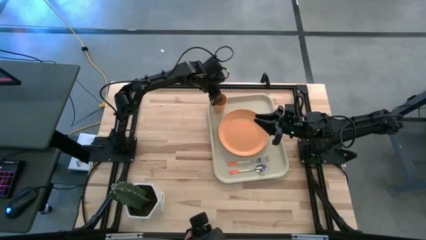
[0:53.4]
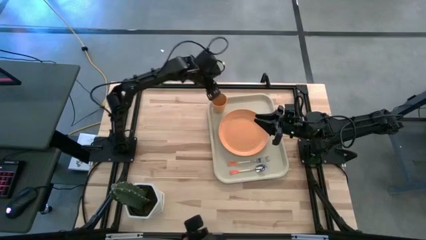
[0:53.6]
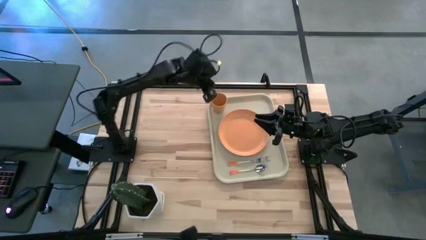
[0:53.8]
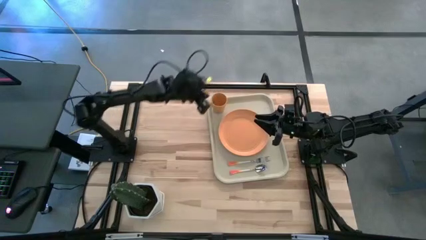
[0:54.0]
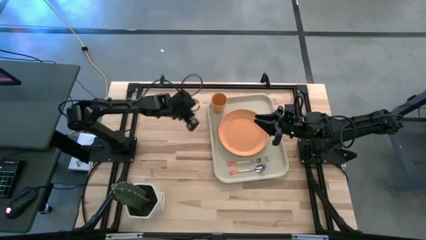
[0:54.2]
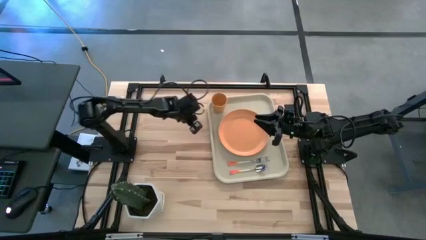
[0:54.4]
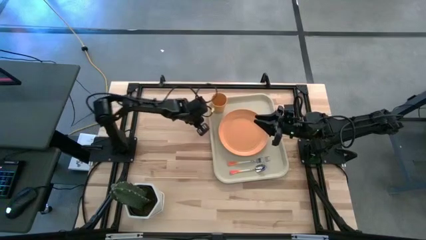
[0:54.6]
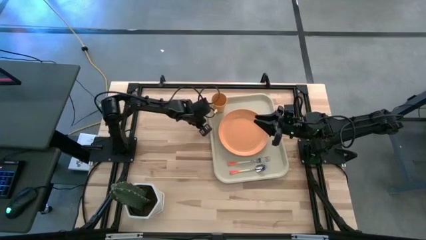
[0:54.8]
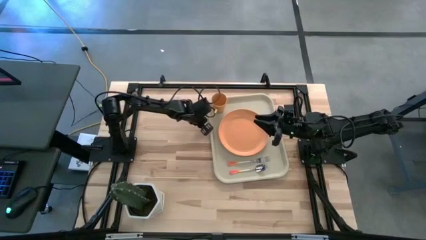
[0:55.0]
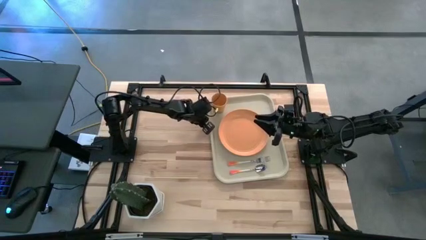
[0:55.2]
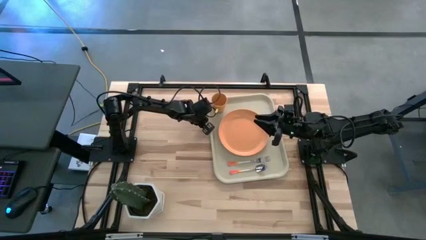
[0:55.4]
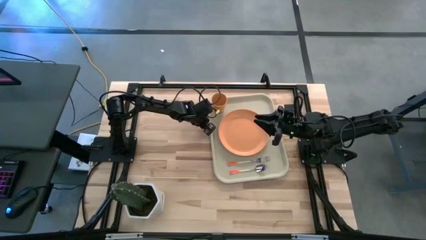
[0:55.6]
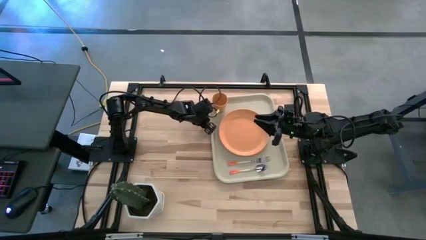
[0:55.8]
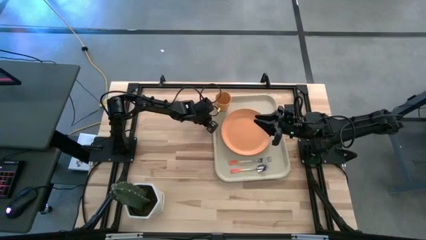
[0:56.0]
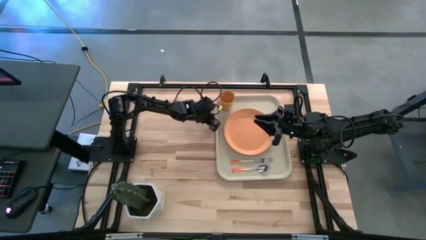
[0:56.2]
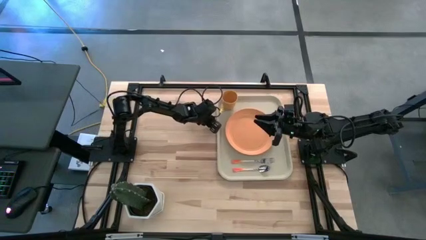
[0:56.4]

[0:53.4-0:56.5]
Task: Pick and place plate/cup/fork/spoon on tray
Adjust the beige serving tray

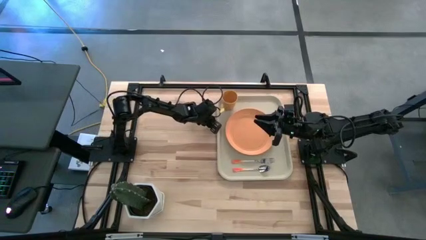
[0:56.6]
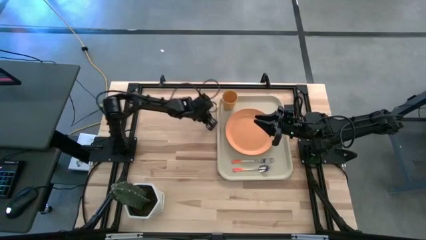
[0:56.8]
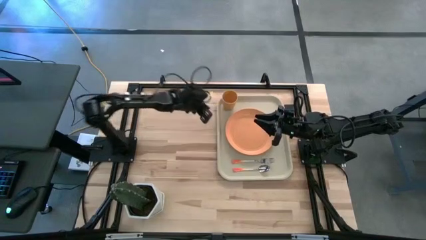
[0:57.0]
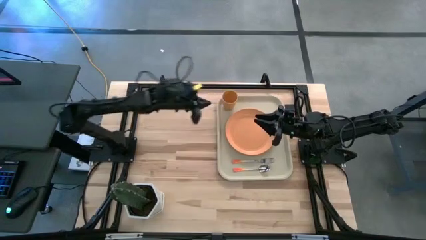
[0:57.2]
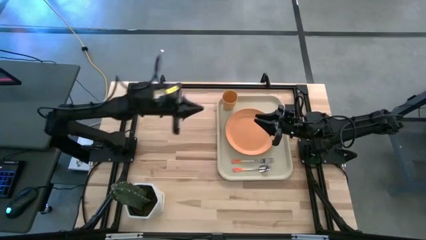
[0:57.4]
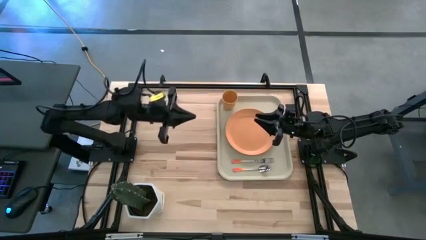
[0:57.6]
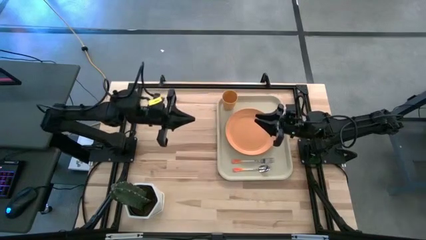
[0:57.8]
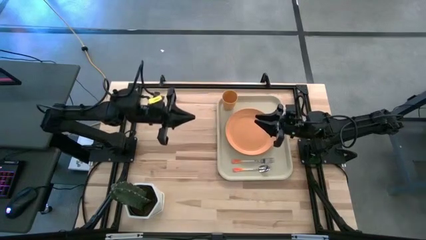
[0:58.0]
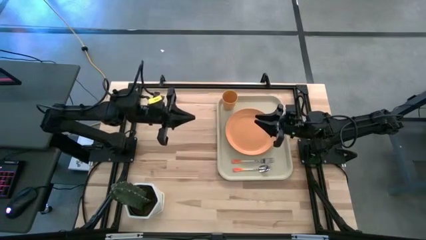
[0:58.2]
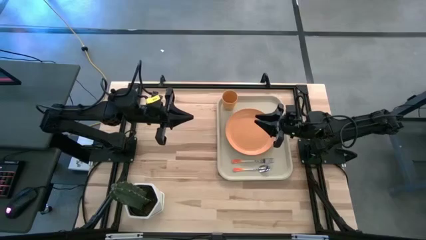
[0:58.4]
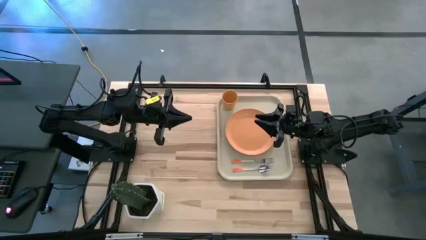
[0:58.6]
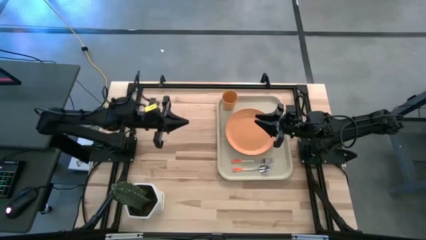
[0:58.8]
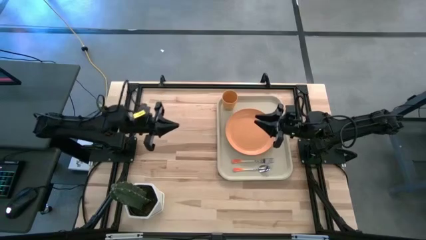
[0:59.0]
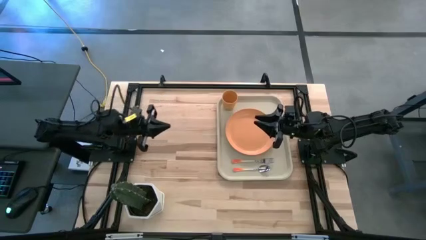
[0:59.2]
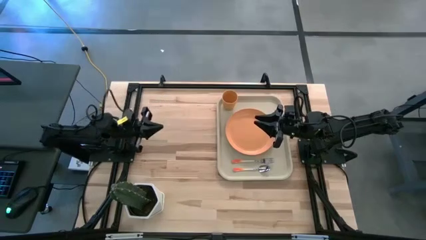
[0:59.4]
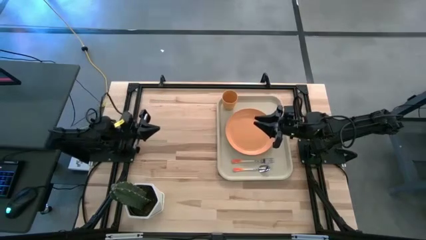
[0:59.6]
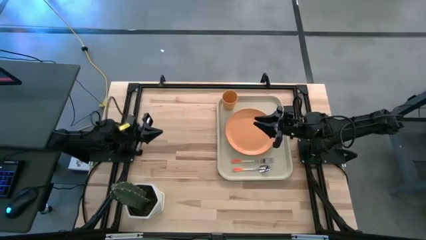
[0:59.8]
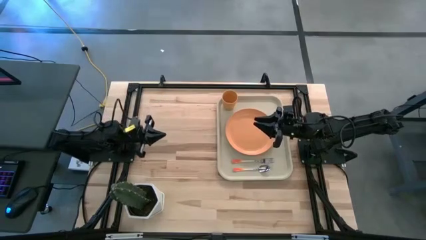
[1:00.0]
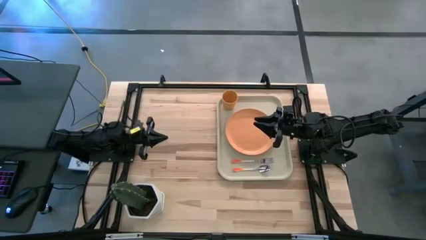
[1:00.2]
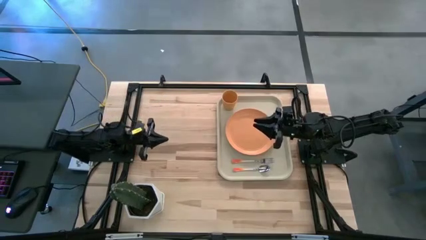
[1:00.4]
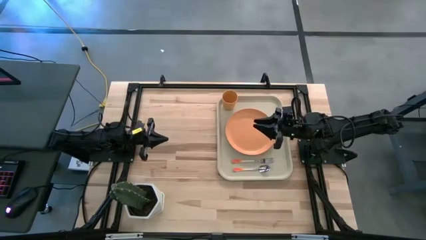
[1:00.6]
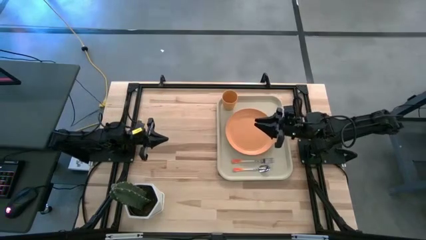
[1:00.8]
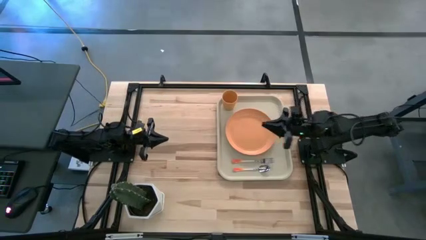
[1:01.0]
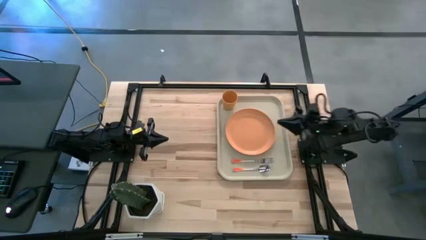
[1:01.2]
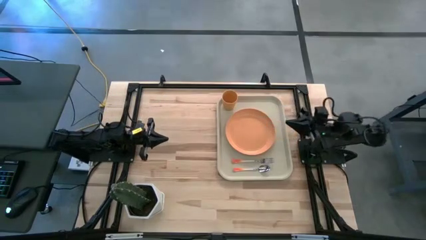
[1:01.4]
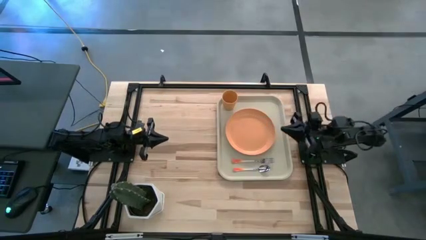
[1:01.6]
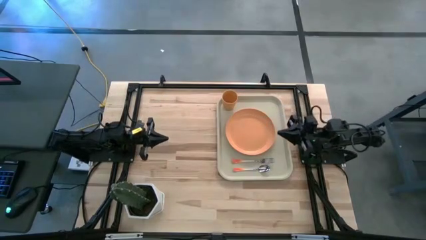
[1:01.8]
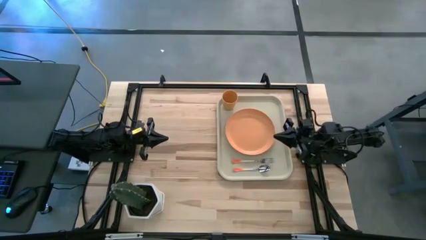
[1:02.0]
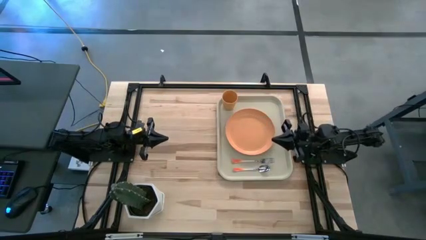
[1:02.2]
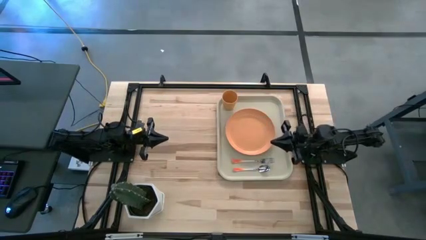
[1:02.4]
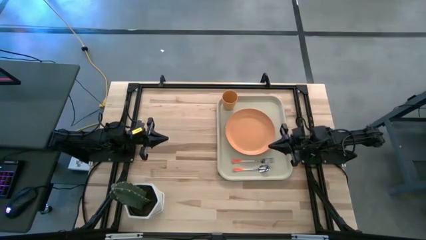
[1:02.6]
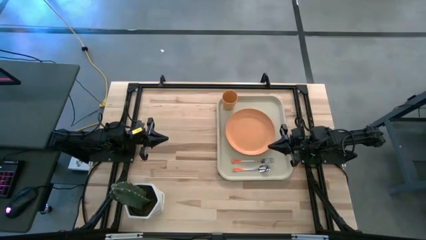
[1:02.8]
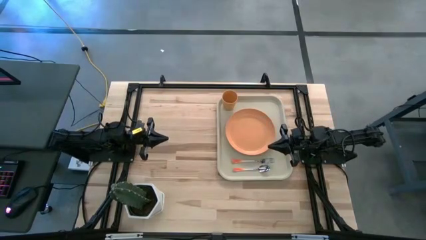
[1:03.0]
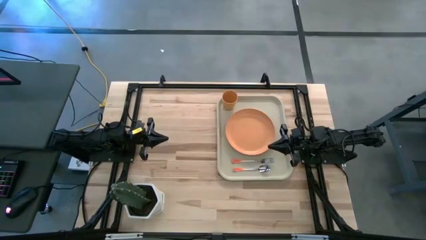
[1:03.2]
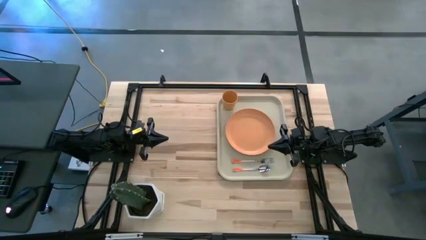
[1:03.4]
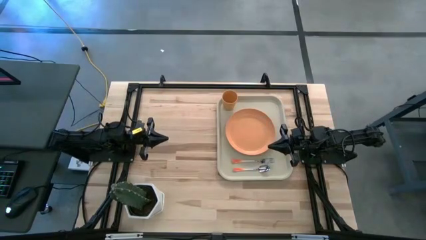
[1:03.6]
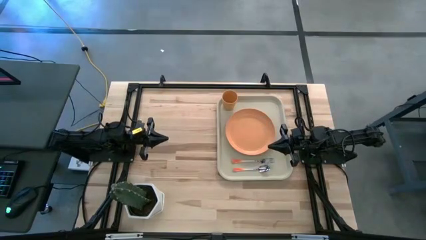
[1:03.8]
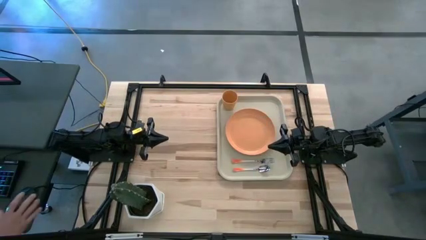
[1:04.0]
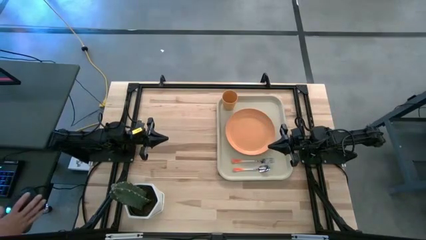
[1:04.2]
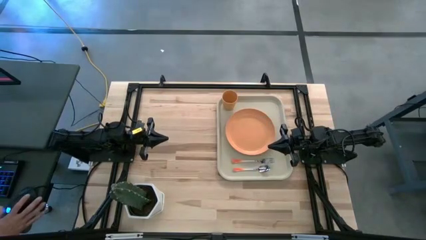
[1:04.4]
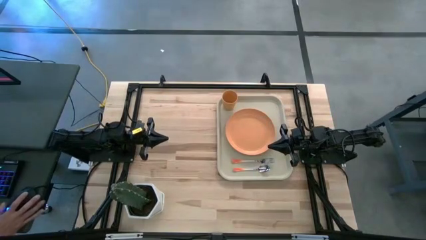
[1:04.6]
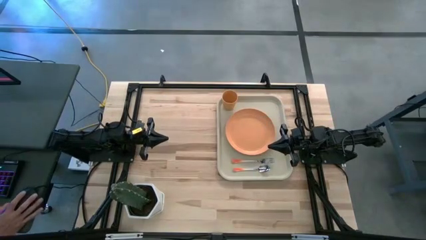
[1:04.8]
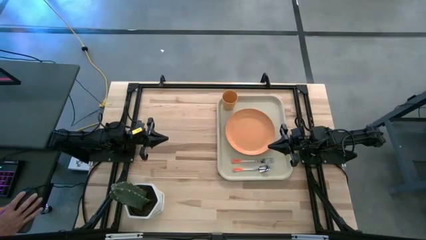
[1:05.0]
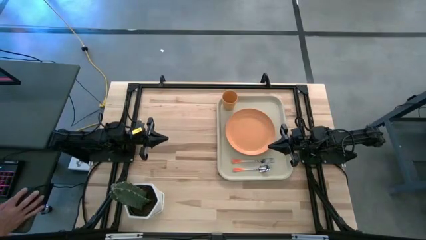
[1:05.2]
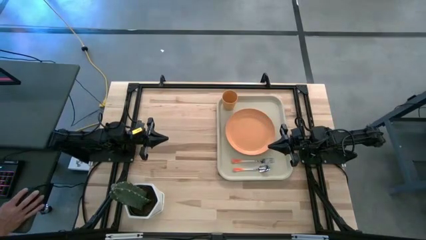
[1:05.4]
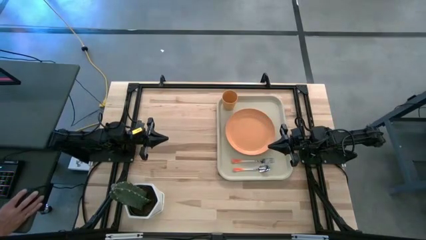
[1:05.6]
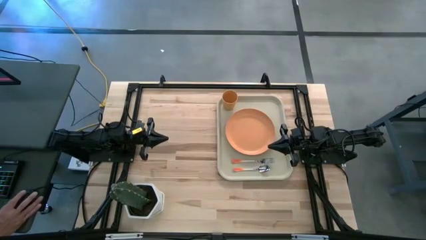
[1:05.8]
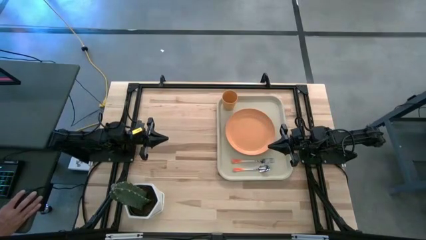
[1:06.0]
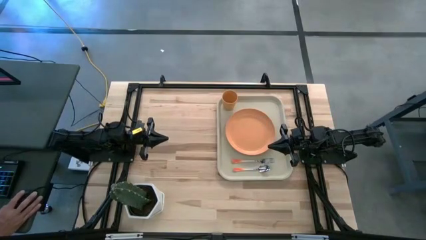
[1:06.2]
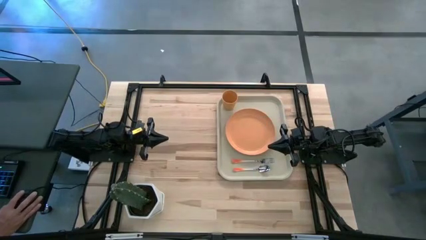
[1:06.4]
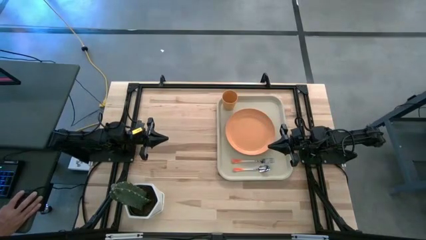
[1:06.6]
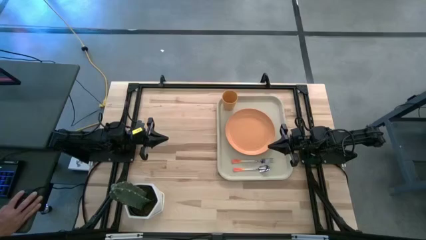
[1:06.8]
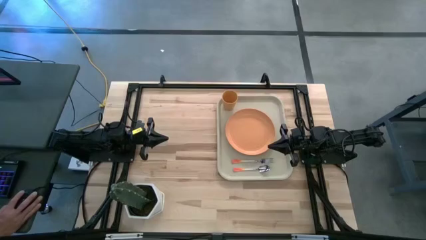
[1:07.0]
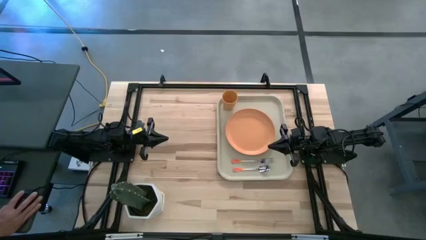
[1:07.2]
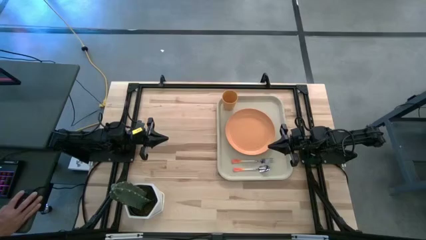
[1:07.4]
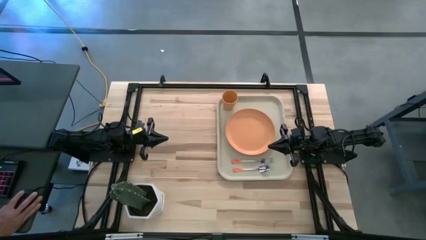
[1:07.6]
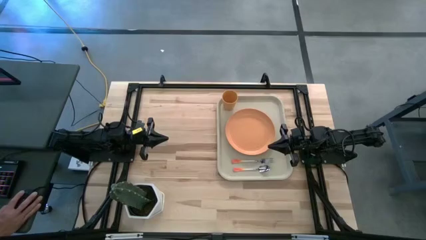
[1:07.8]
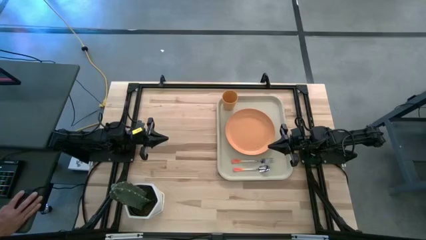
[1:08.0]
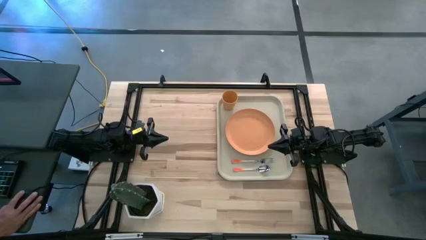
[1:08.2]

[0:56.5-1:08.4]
Return to Home Position

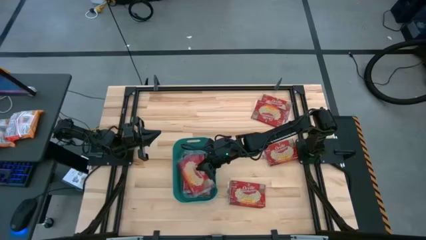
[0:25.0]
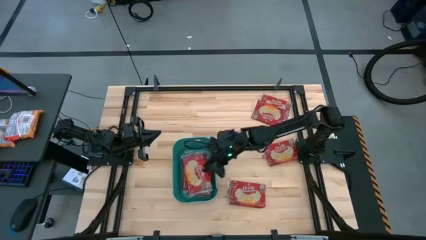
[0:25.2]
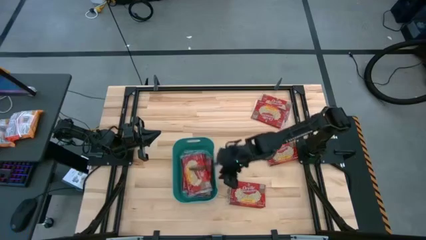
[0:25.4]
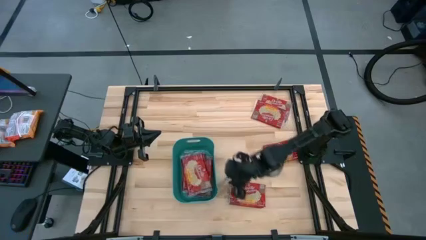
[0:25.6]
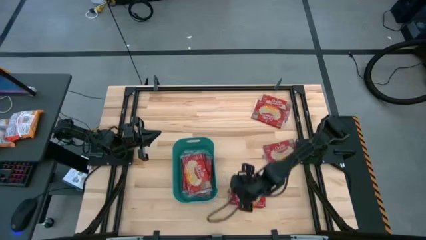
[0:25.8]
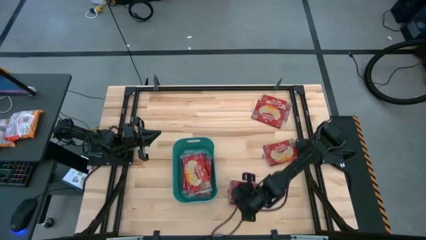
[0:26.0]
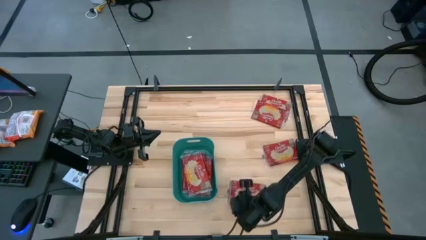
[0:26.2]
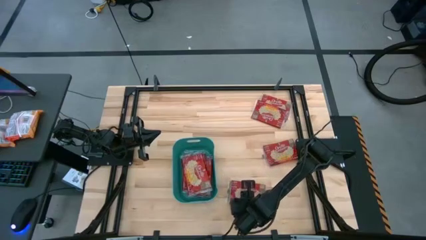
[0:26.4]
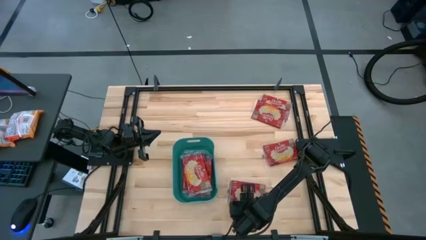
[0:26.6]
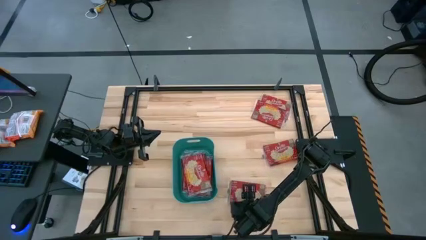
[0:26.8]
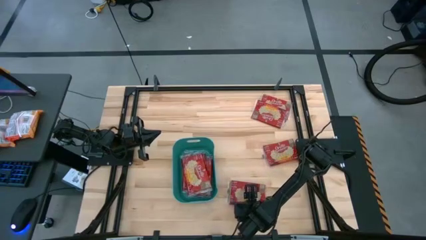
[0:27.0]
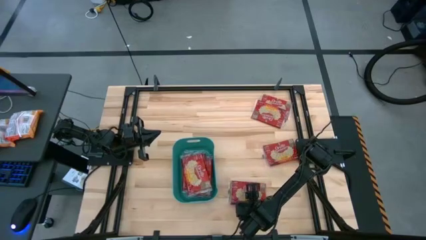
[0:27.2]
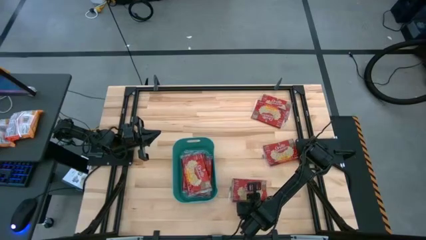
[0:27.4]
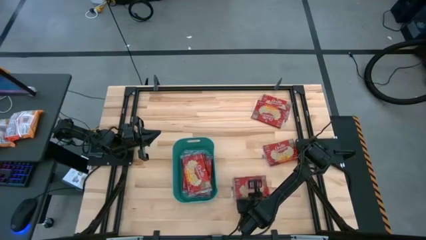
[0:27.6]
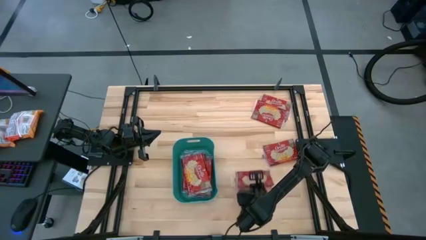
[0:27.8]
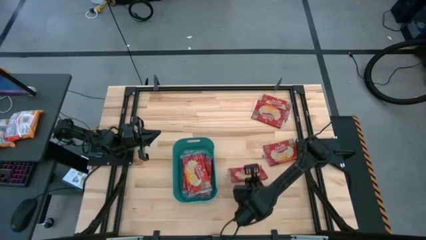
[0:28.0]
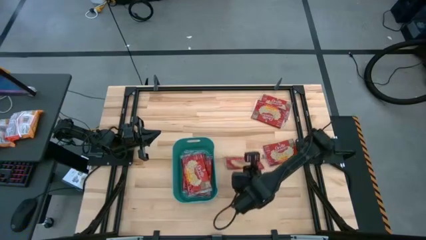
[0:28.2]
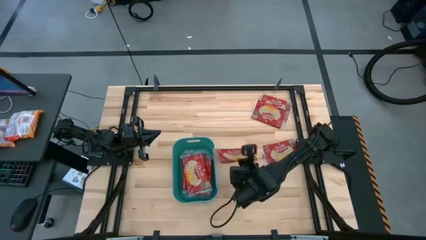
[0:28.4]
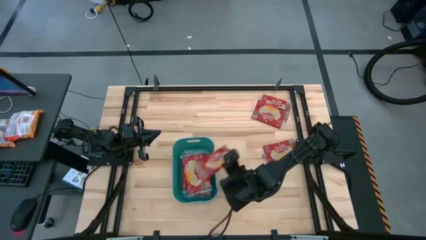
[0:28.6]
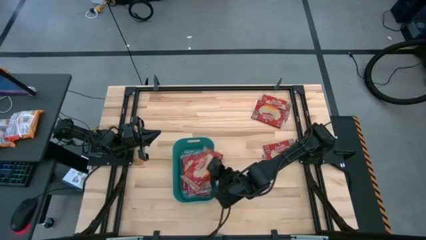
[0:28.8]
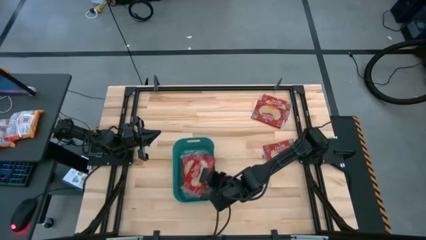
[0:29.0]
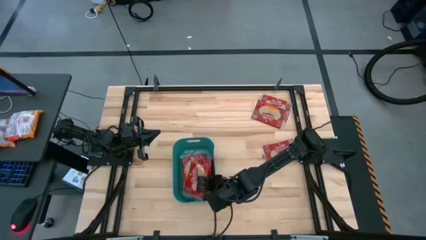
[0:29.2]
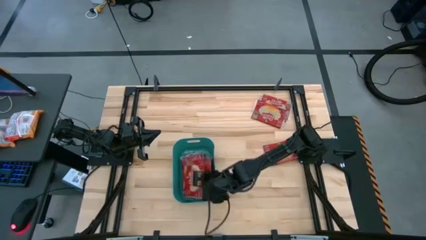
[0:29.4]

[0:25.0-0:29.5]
Task: Sort popcorn bags into baskets
Put the red popcorn bag into the green bin
